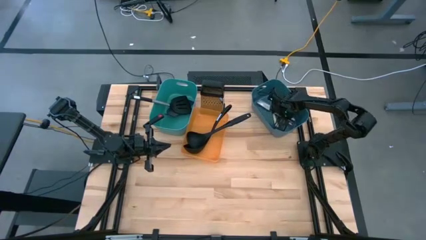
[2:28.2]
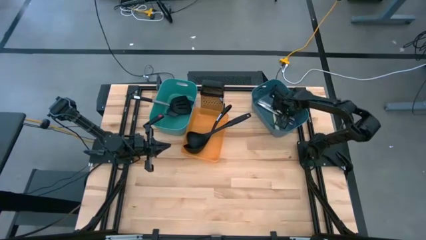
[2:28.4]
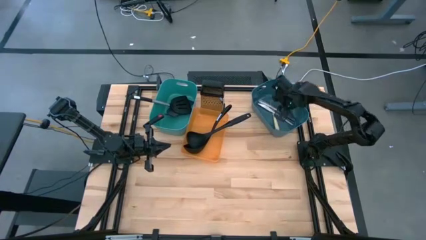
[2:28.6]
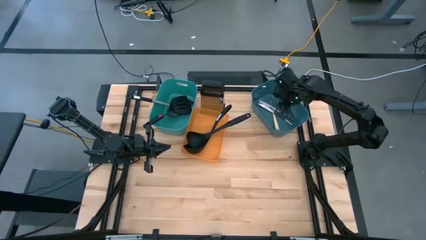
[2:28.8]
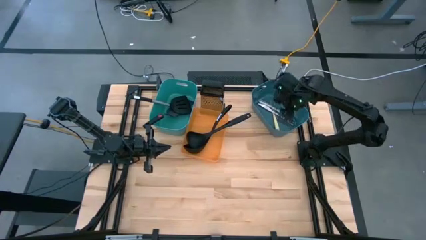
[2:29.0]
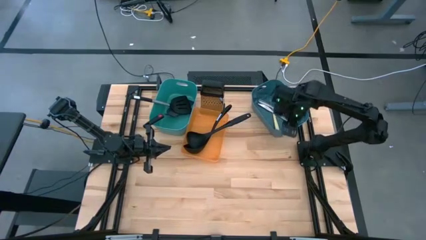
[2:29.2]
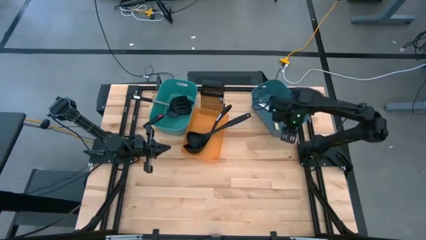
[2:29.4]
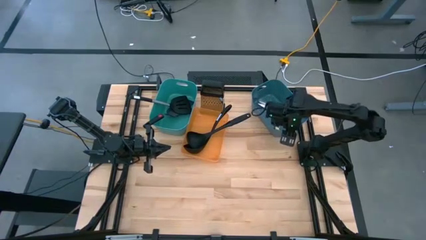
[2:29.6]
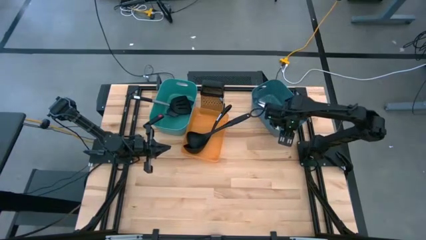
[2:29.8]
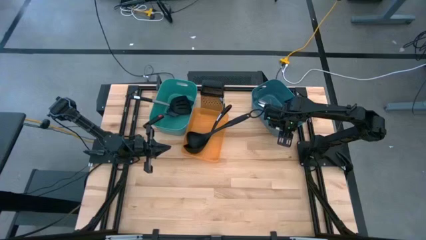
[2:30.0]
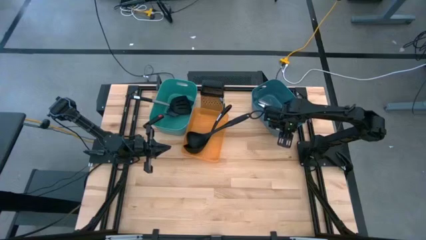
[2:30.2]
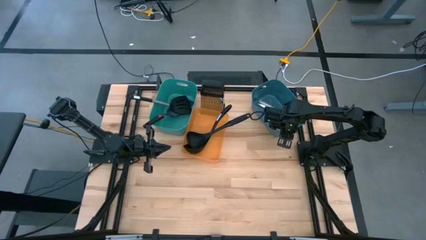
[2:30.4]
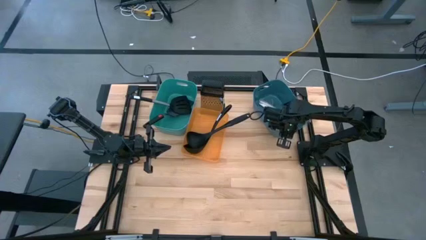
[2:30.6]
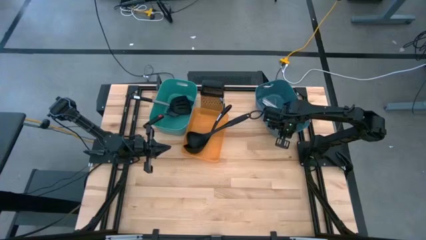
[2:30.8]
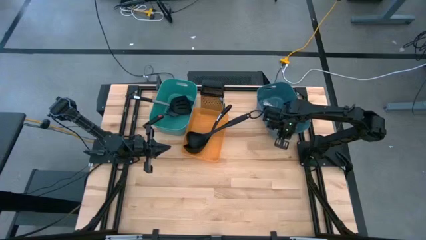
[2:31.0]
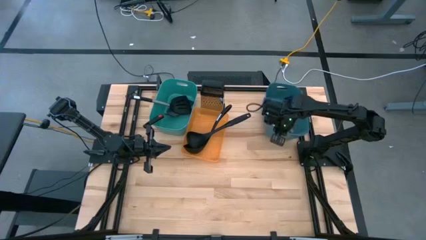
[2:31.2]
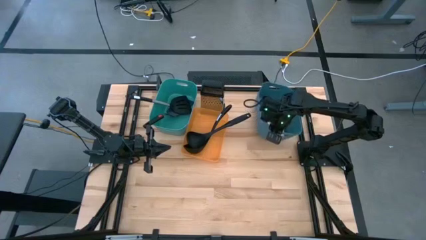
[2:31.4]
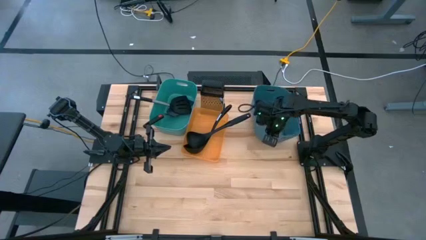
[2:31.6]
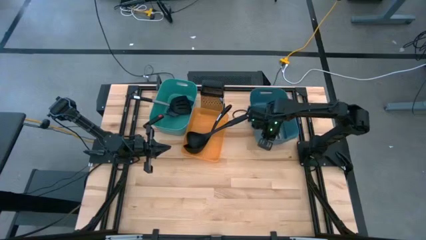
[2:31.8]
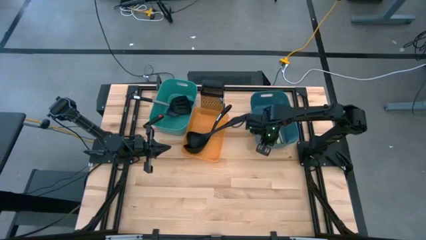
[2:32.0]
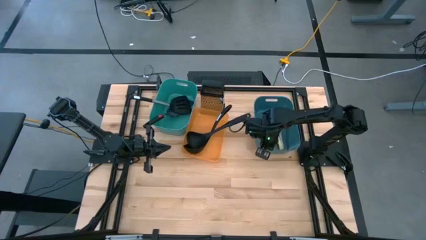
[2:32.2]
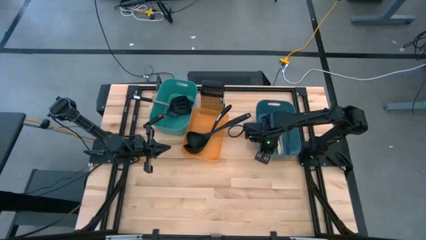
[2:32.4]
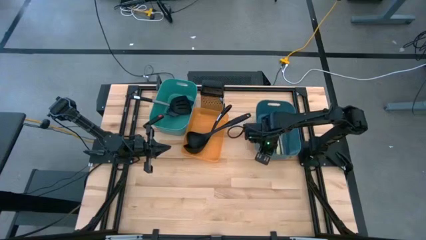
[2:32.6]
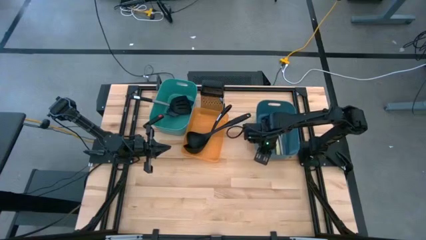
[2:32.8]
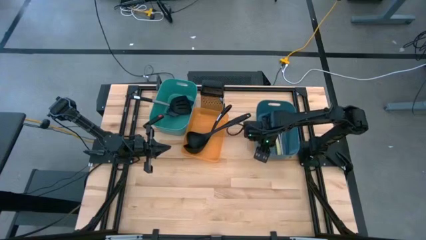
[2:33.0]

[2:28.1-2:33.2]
Task: Pick & Place Kitchen Items
Adjust the blue bin

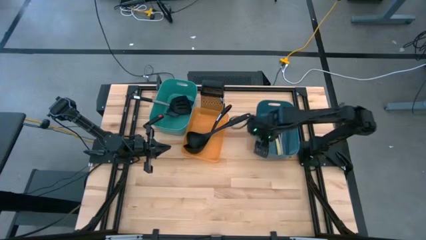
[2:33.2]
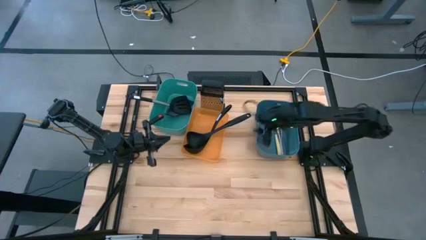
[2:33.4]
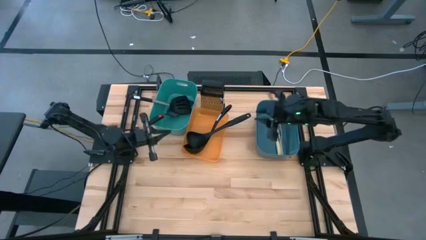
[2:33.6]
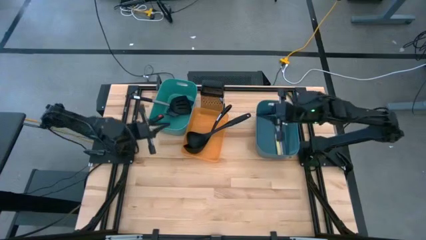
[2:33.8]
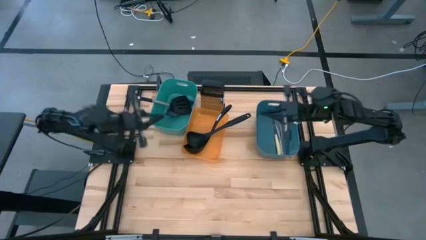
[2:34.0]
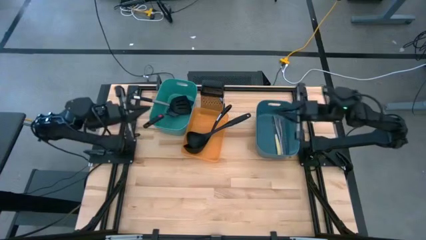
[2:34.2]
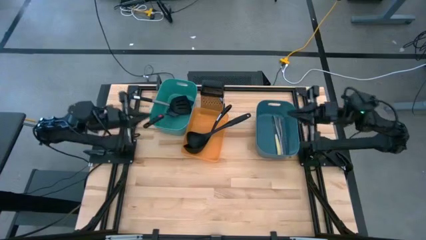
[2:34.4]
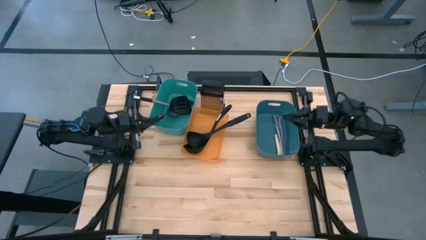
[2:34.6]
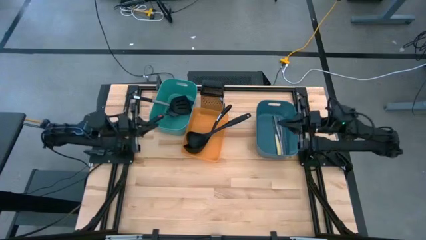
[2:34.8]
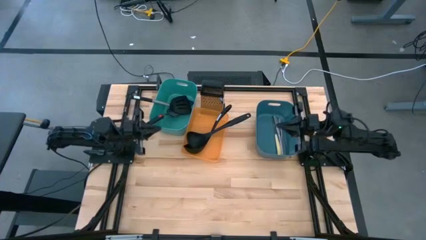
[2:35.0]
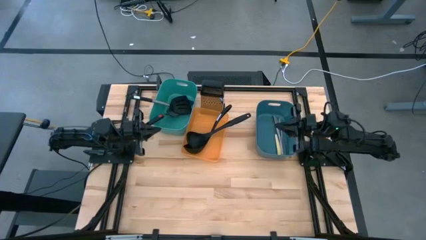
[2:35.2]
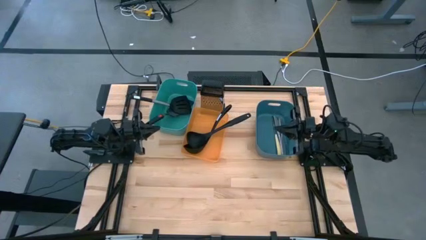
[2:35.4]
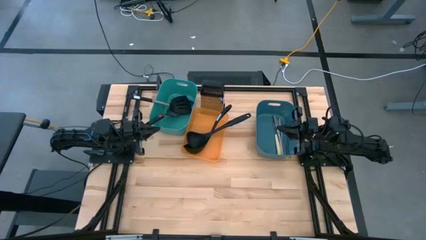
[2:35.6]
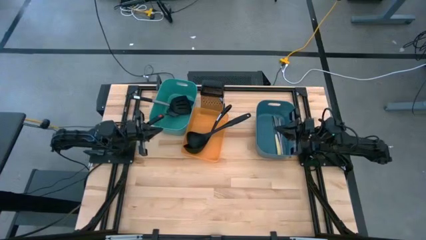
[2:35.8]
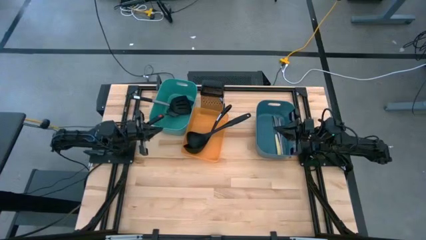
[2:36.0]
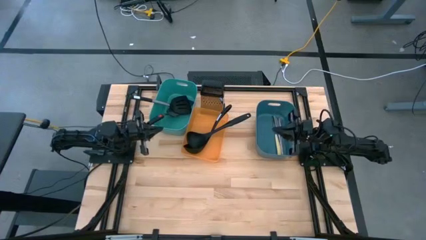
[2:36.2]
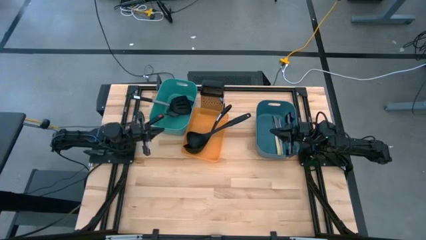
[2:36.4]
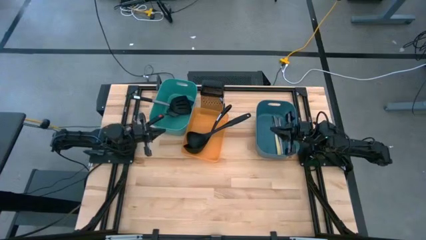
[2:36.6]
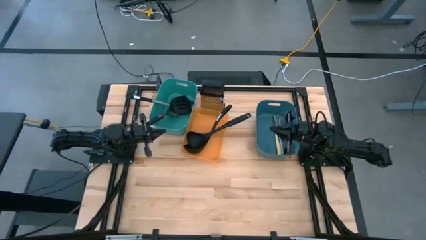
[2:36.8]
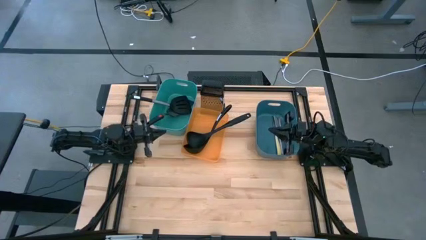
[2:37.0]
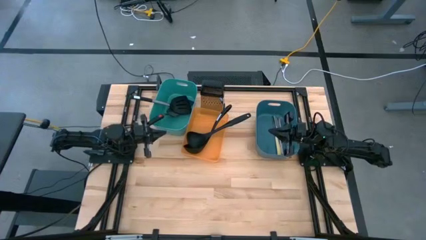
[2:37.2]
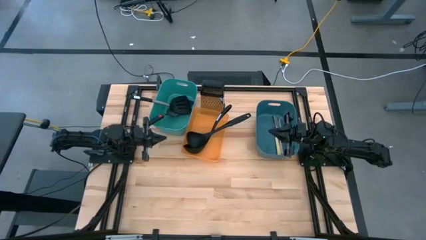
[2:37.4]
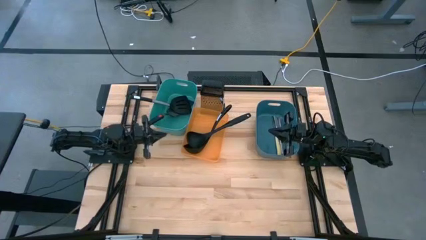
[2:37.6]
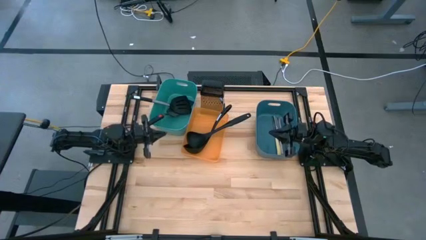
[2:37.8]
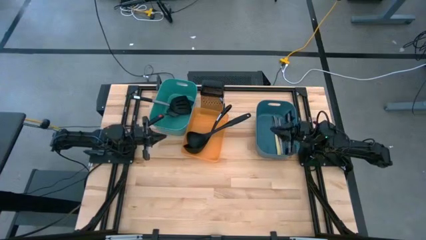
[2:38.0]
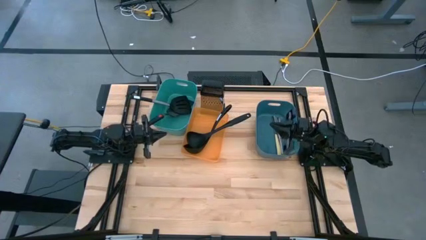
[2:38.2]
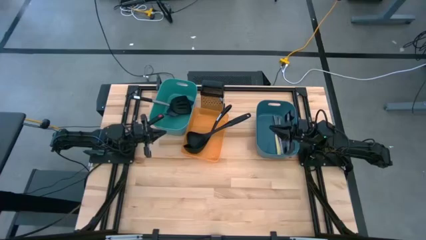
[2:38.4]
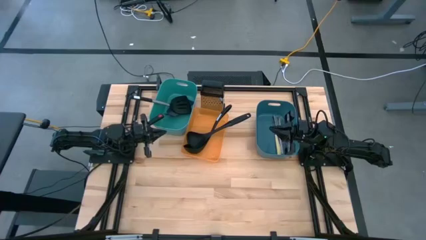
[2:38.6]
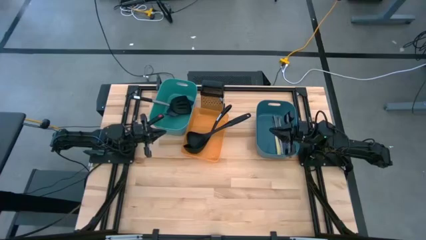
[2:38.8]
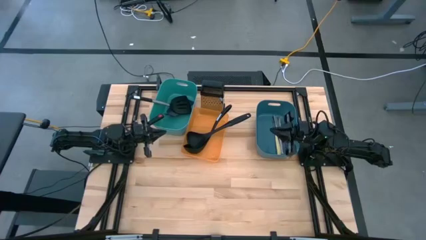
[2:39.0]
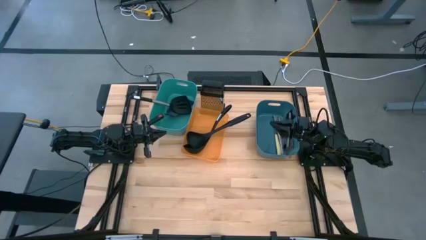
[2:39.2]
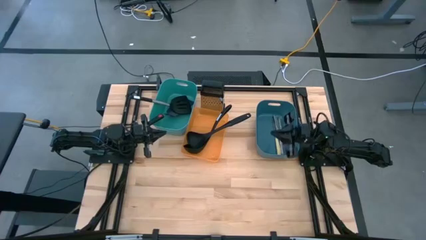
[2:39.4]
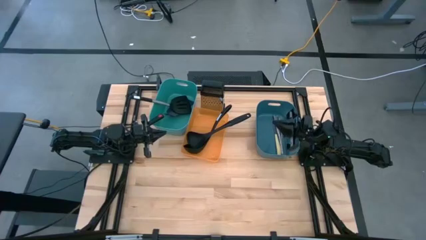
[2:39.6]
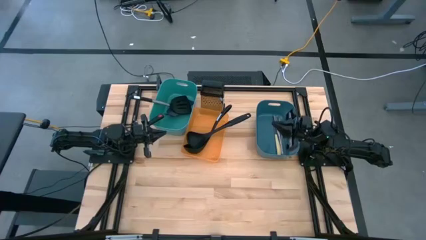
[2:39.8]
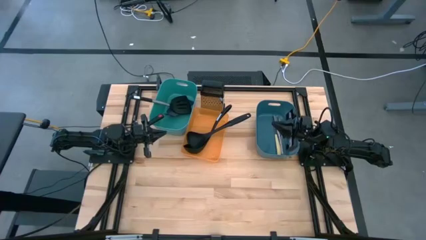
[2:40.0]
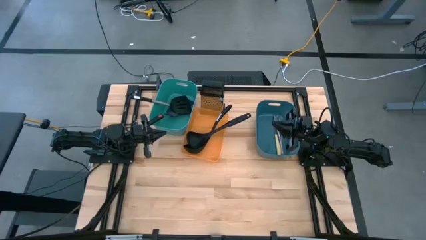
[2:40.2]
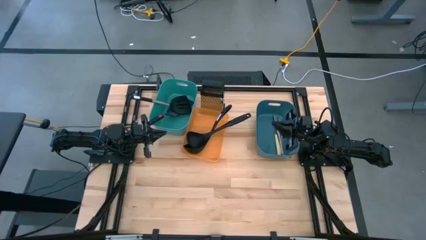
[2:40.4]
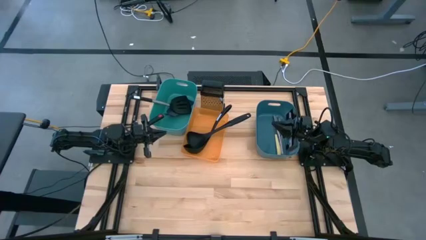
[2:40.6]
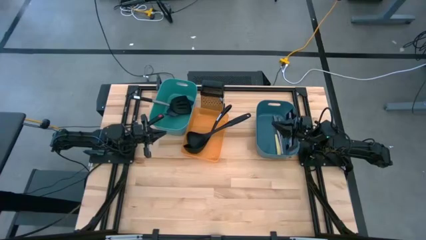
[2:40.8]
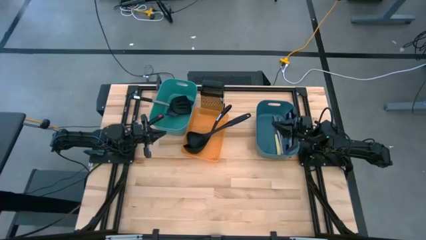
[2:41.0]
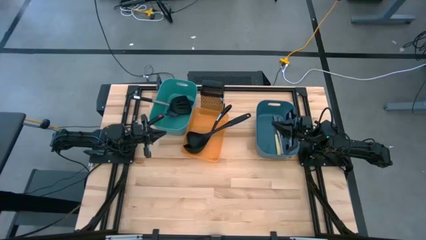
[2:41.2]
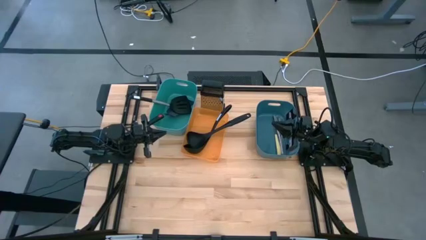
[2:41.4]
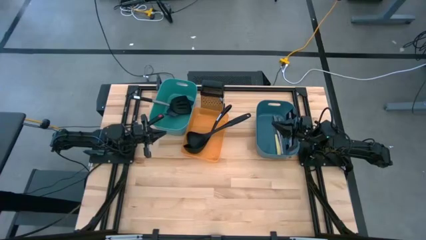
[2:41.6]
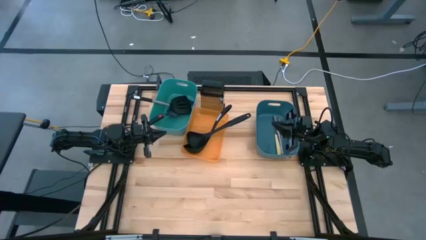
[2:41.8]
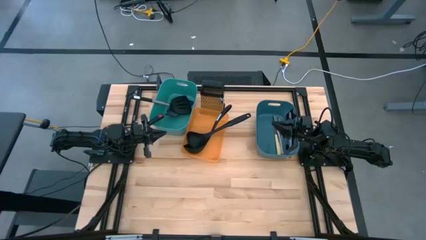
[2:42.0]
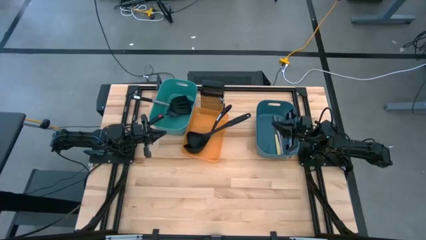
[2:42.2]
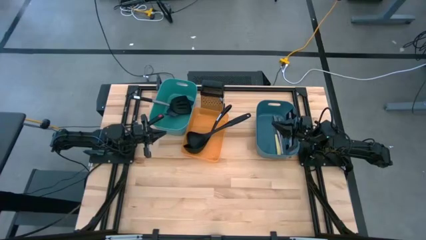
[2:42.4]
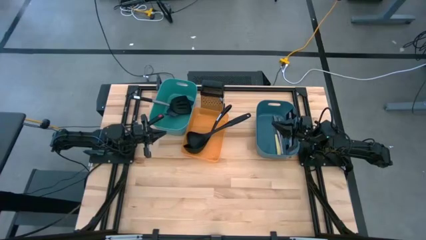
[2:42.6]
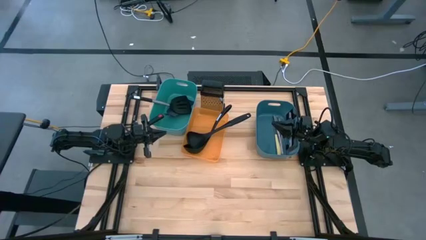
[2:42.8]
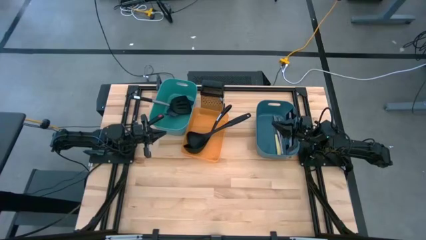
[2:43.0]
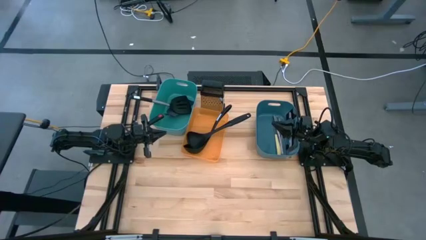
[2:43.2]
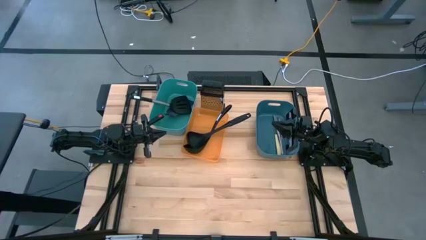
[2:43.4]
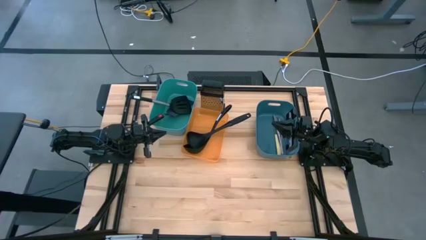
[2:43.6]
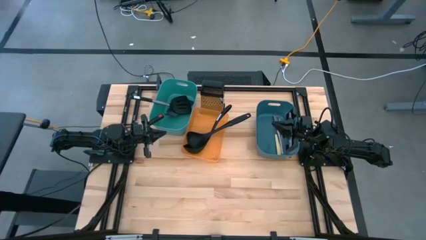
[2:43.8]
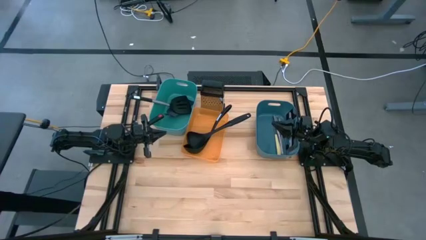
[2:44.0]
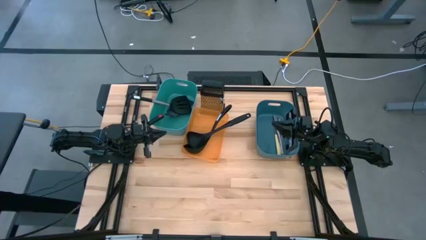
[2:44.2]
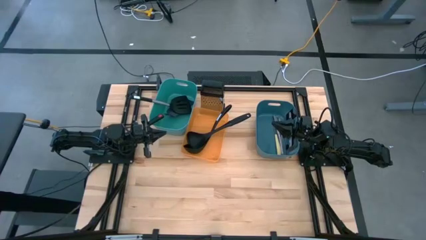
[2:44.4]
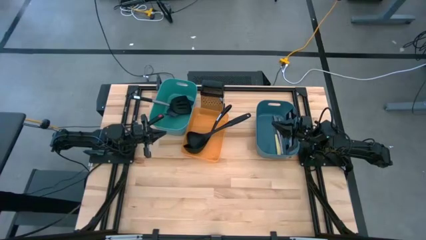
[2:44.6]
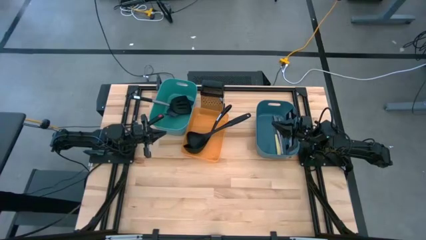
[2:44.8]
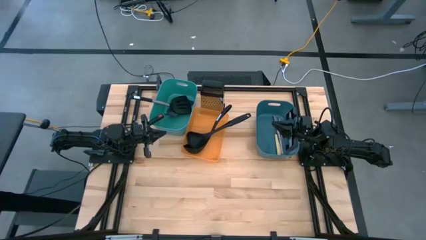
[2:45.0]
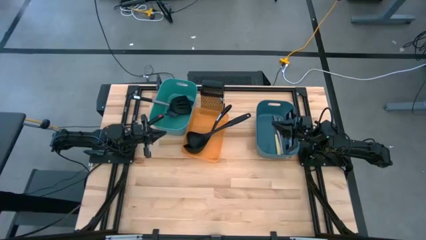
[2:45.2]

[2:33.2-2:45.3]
Return to Home Position
